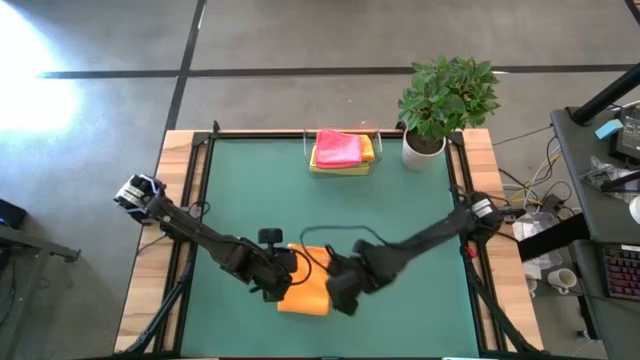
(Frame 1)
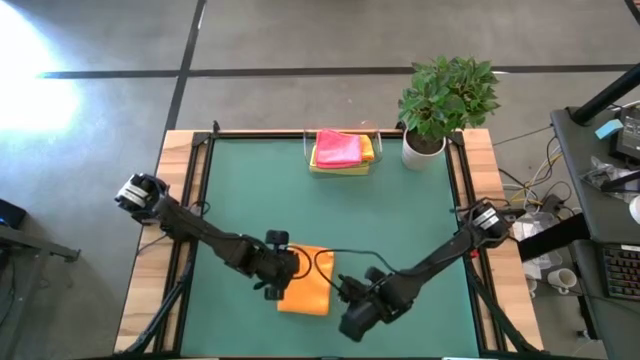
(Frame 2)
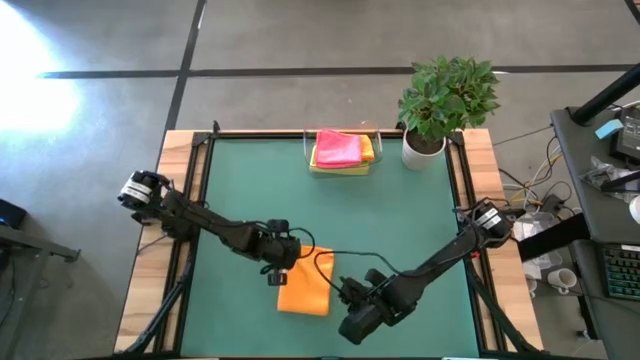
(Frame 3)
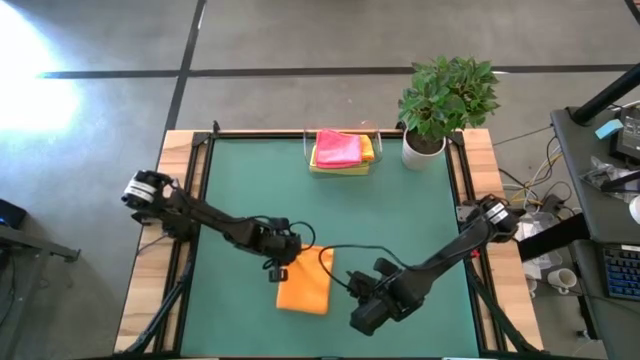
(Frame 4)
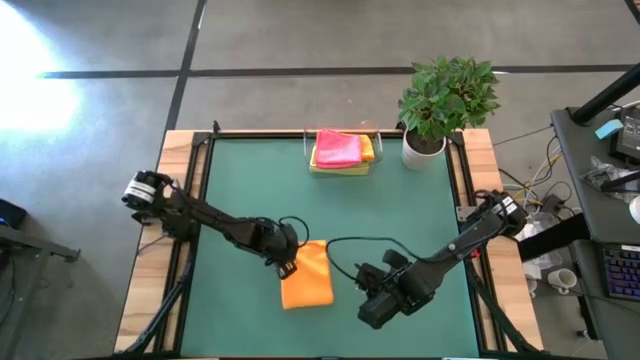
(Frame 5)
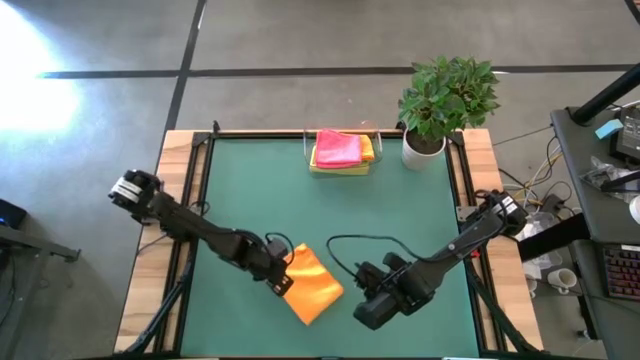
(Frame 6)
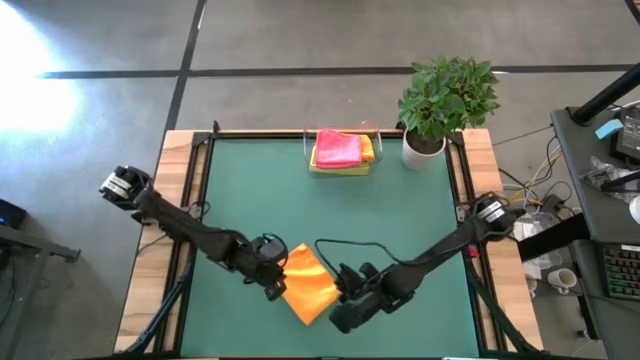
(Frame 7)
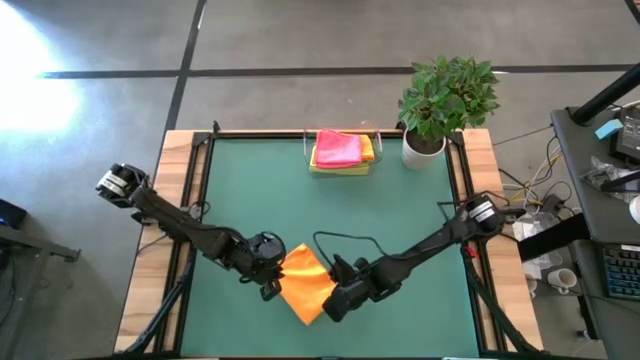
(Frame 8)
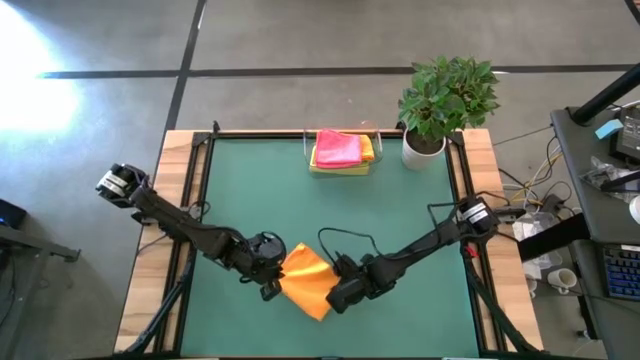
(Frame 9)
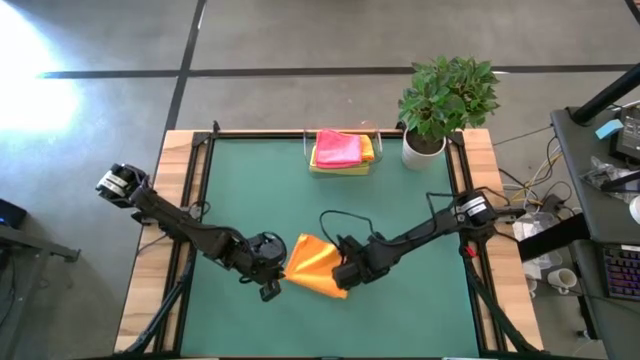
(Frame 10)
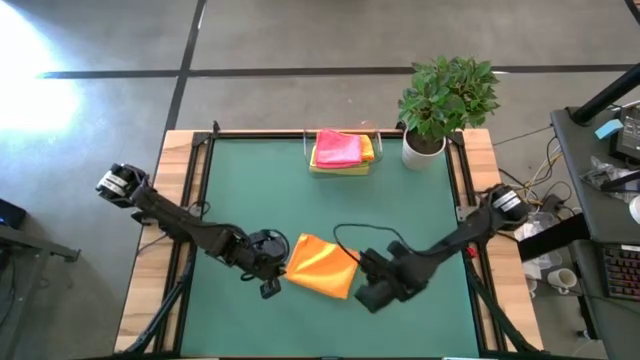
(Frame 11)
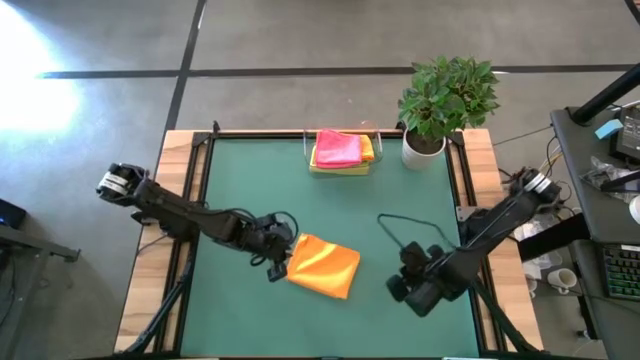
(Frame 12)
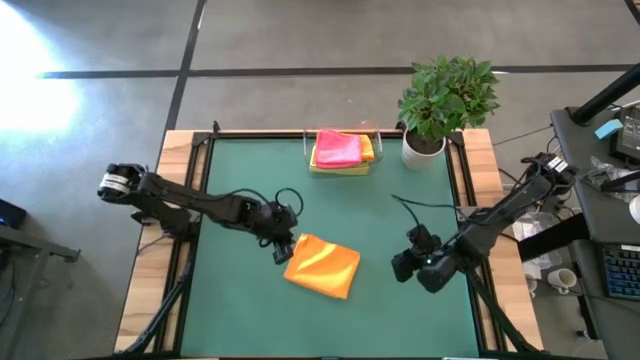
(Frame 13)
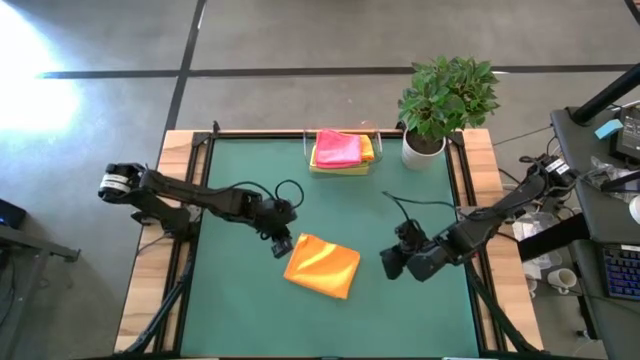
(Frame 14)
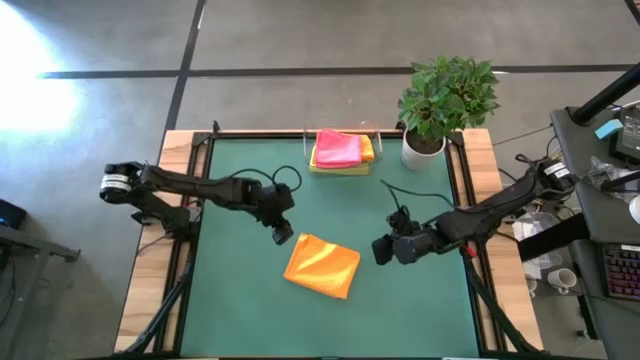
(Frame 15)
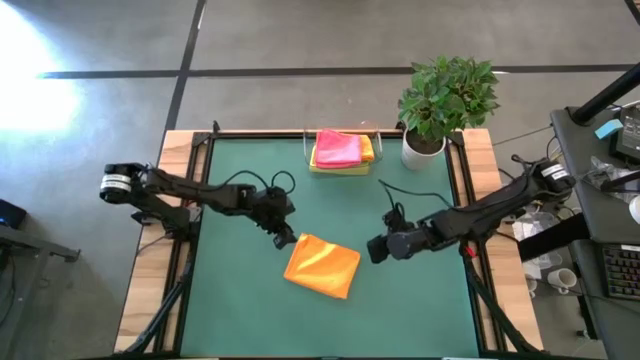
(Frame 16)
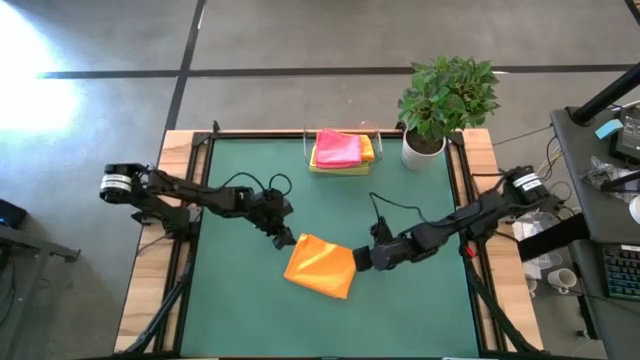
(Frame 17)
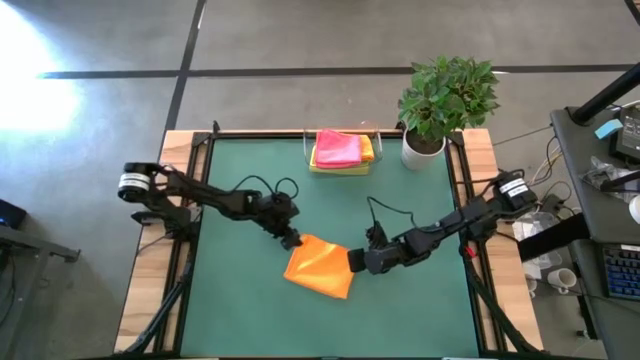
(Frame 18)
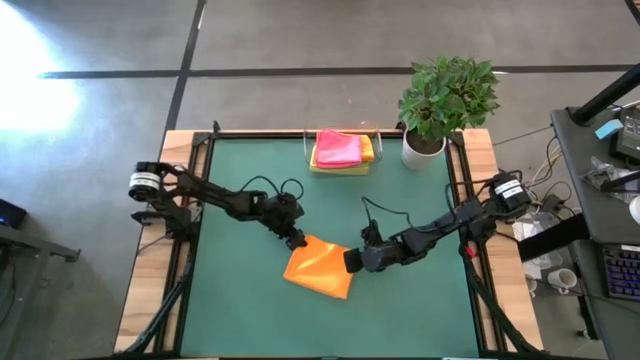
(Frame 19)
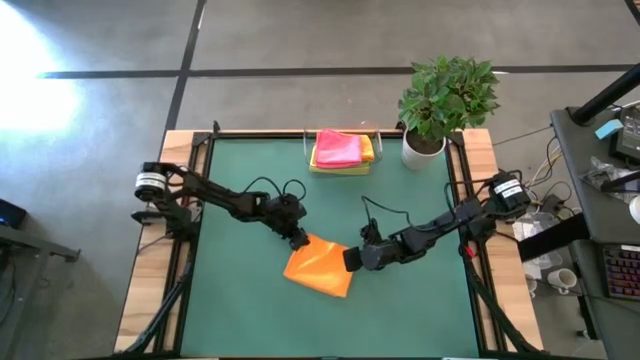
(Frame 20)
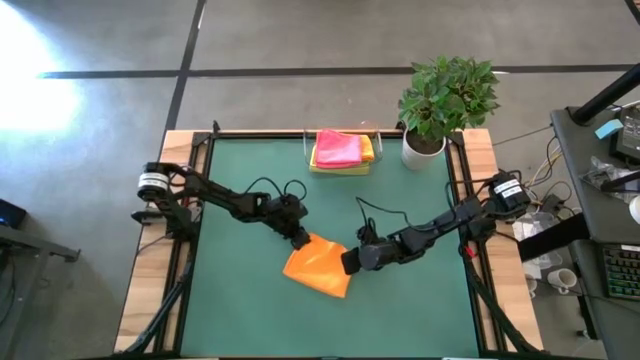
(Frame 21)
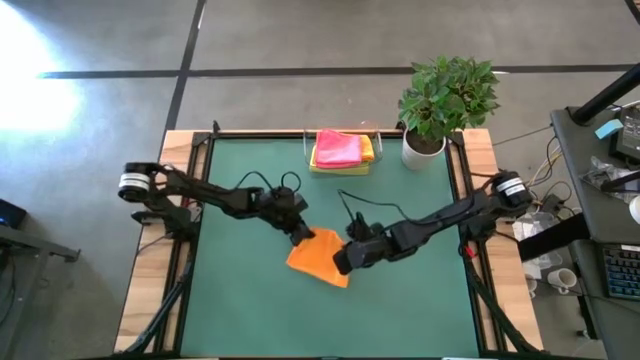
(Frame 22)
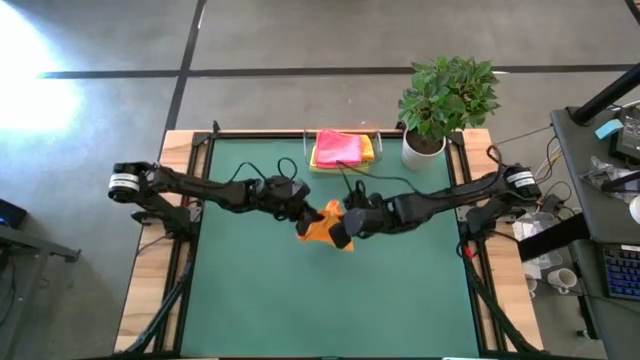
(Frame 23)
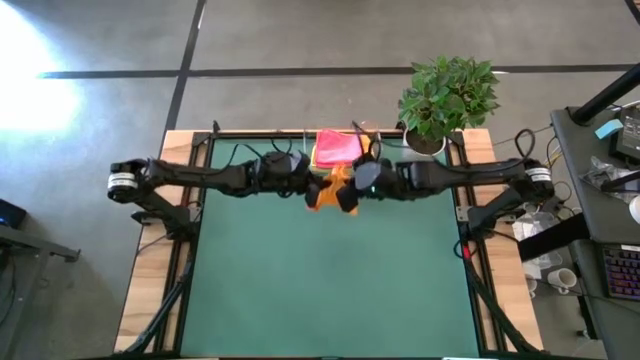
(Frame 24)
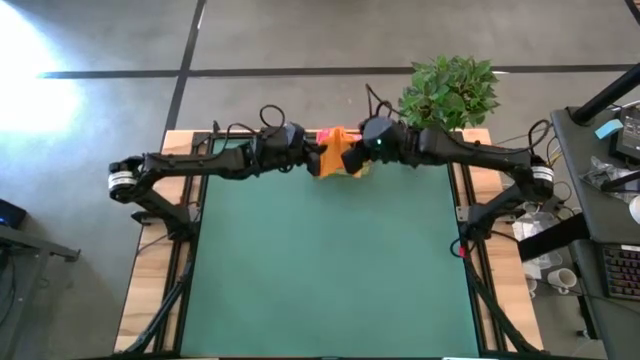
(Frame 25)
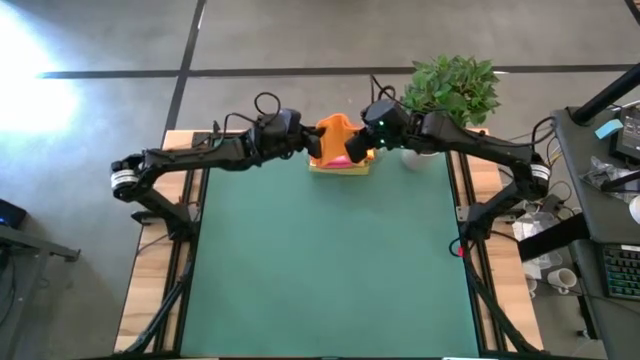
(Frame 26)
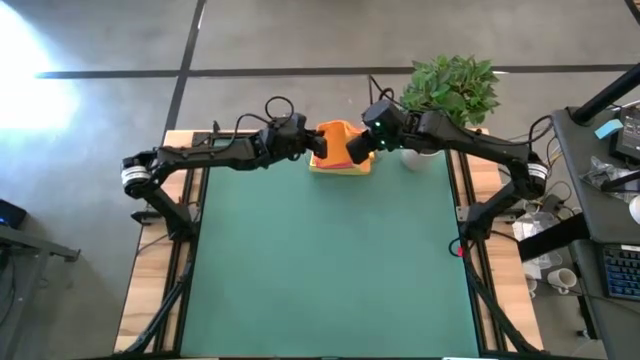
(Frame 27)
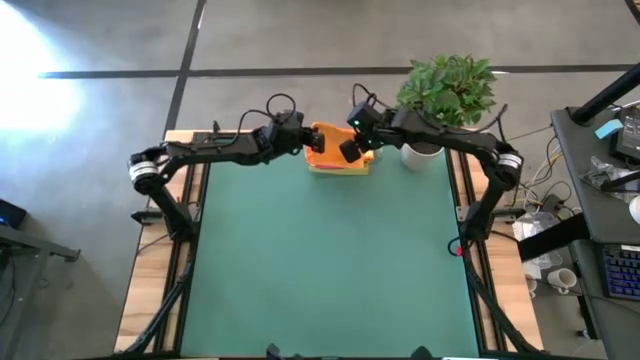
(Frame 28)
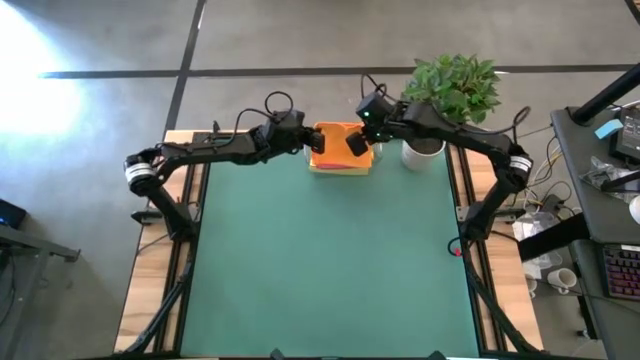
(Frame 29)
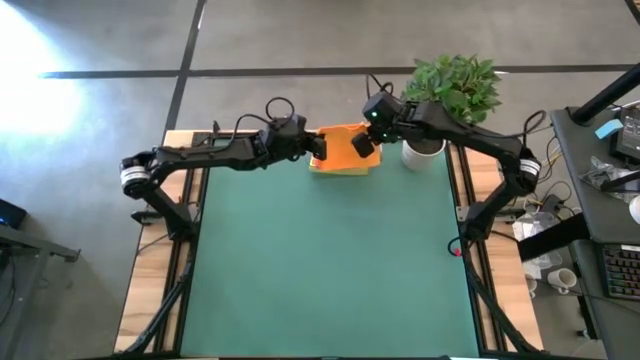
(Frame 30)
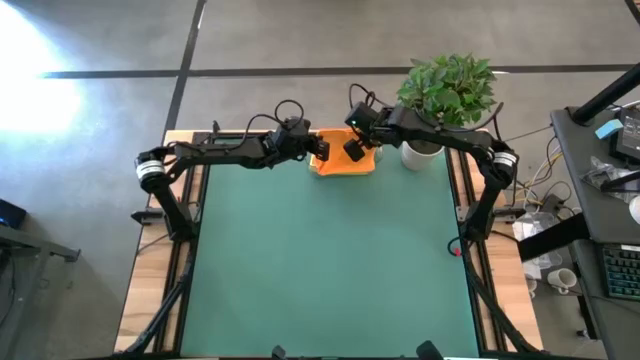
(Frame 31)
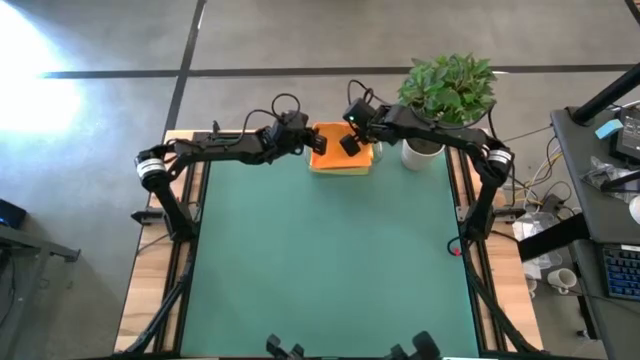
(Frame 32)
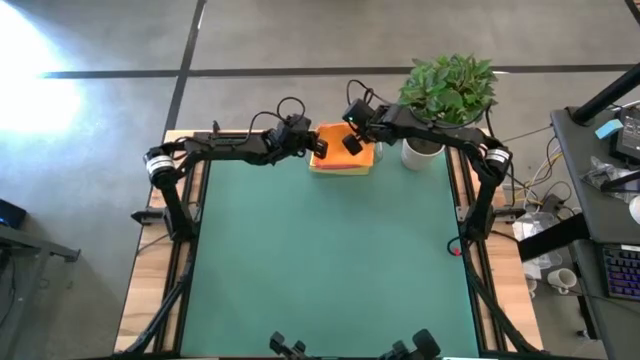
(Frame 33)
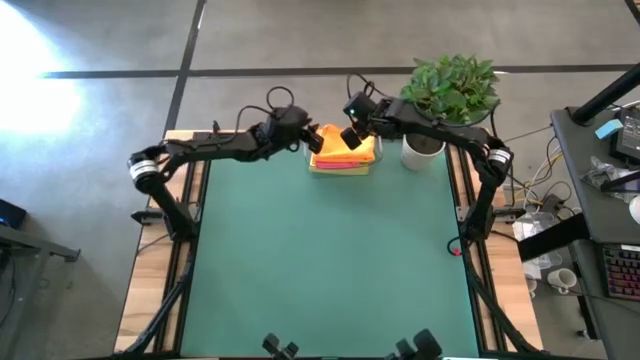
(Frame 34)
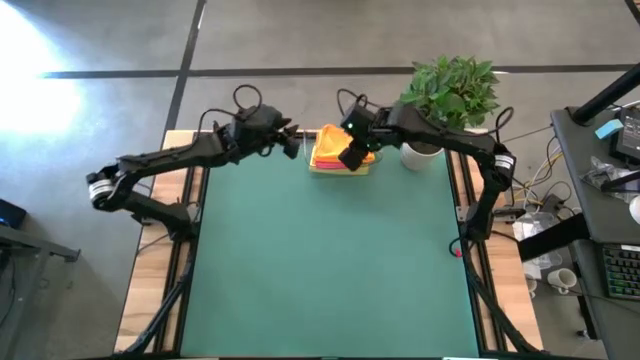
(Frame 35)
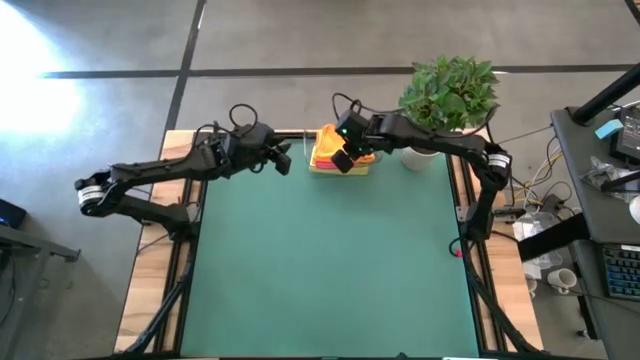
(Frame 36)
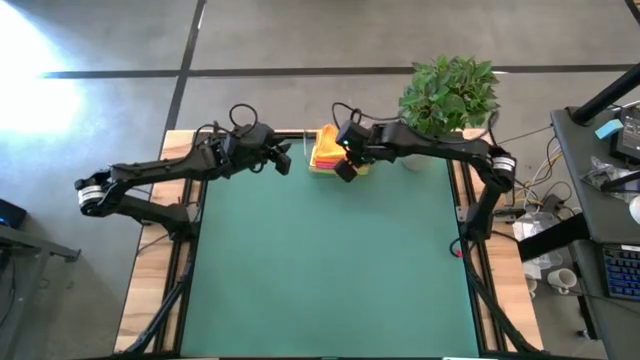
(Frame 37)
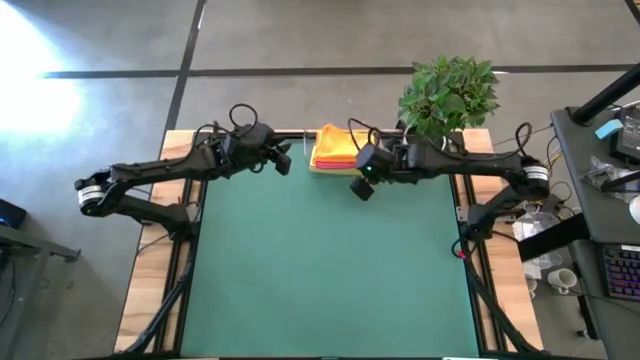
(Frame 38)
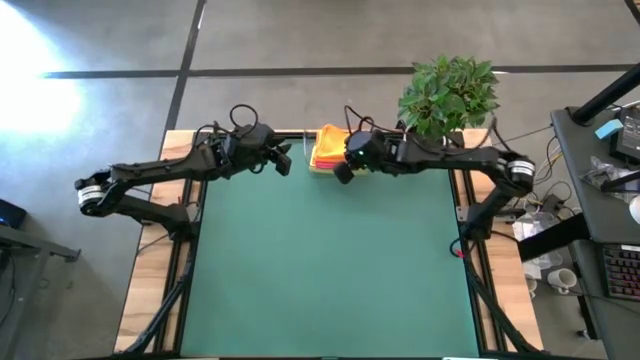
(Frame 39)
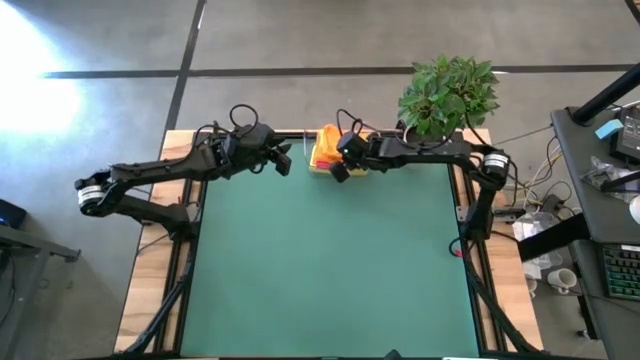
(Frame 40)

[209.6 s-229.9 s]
Task: Fold microfiber towels
Put the folded orange towel into the transparent bin

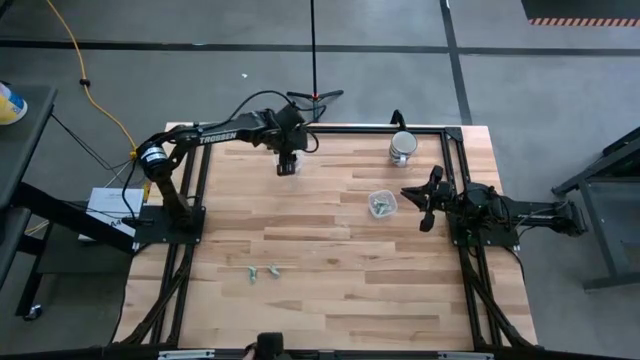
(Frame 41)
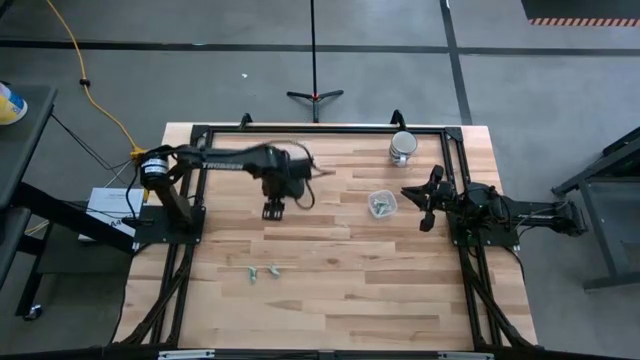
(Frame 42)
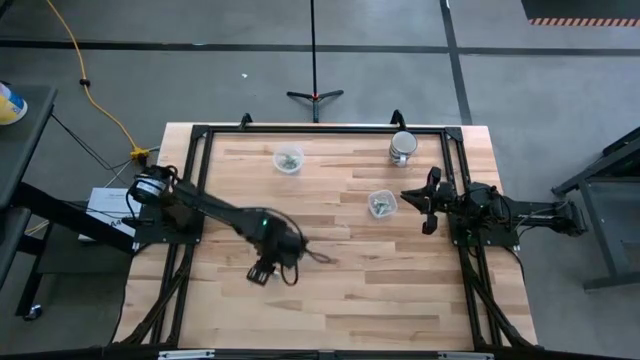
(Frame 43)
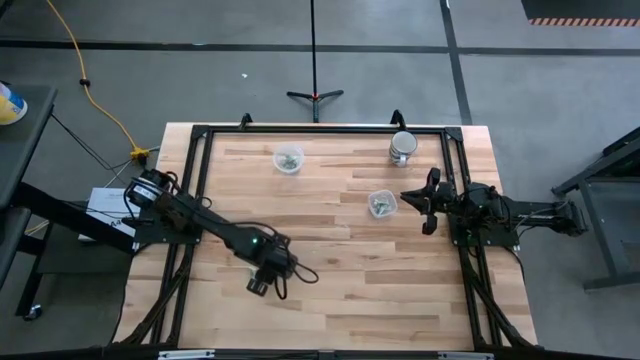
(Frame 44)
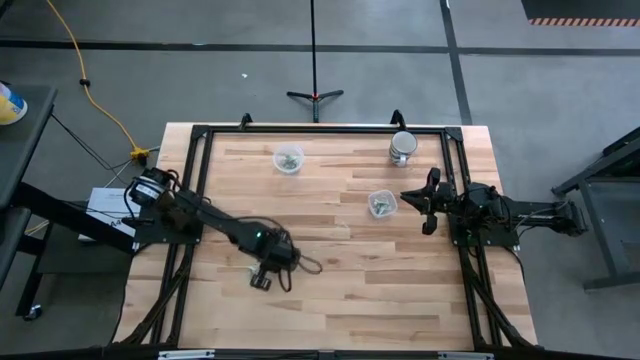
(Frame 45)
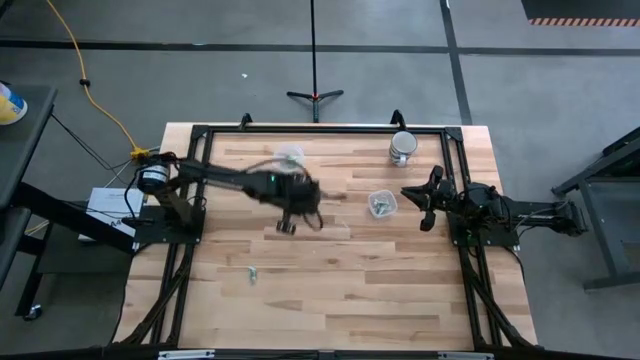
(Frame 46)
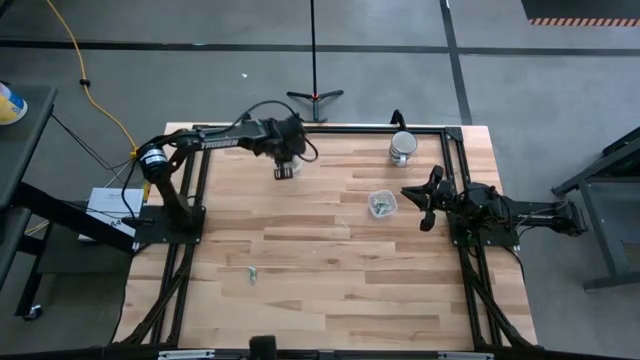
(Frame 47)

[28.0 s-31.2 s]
Task: Pick and place Stevia / Truvia into bins
Put the stevia packet into the round transparent container
